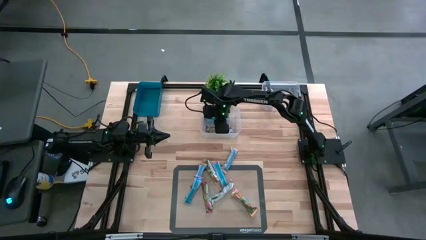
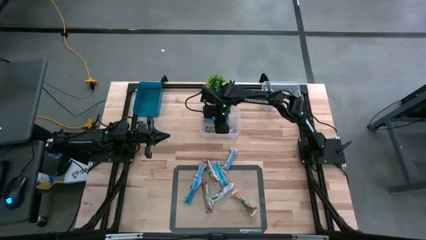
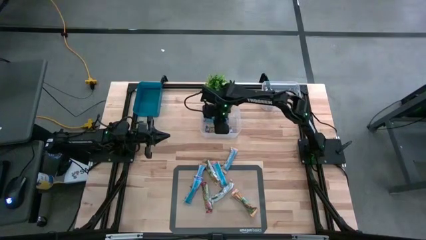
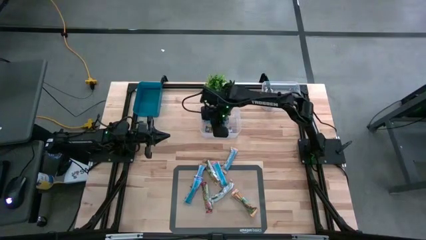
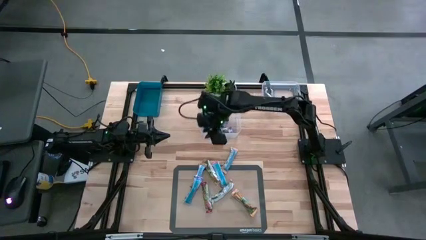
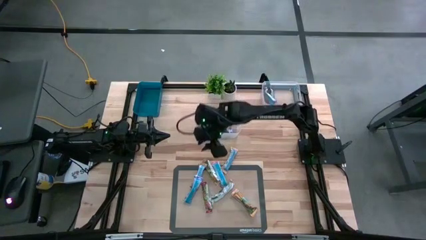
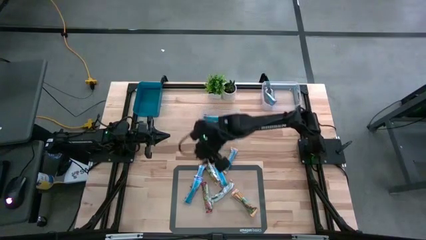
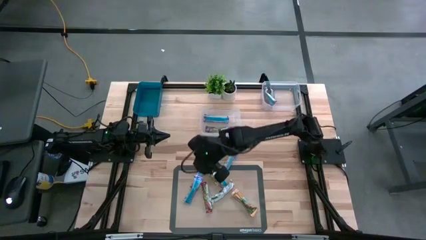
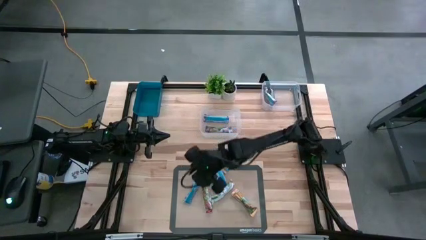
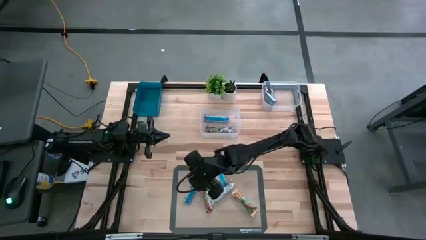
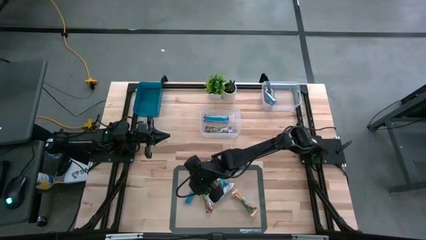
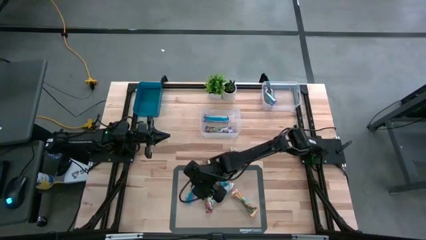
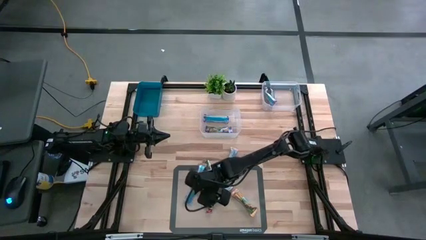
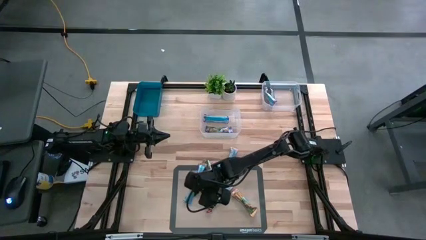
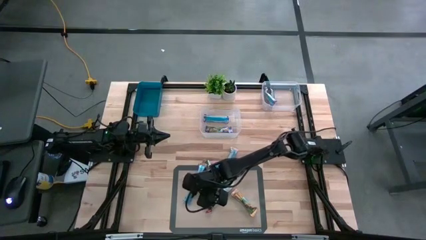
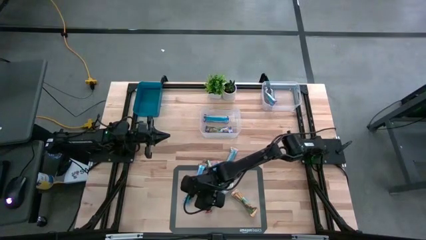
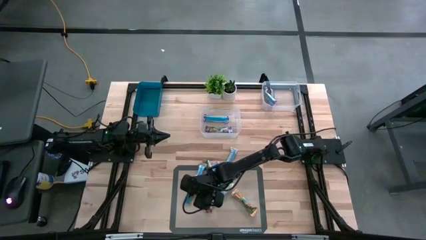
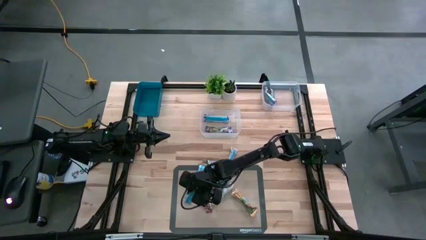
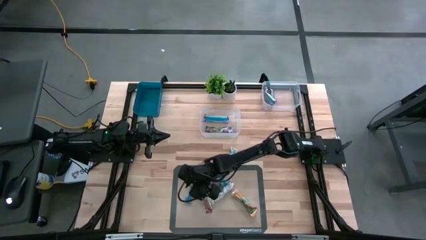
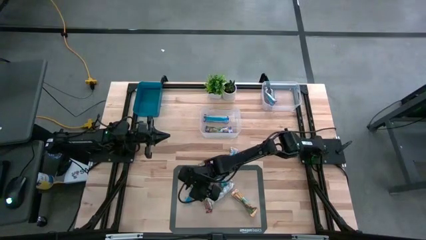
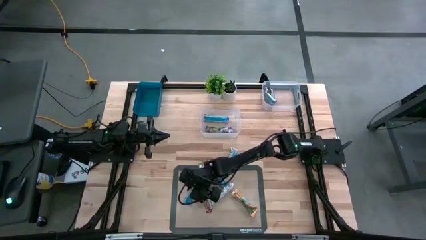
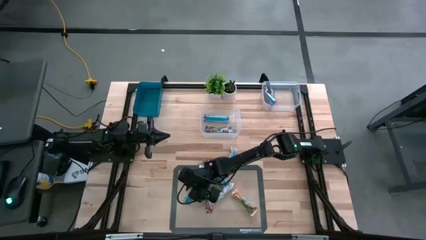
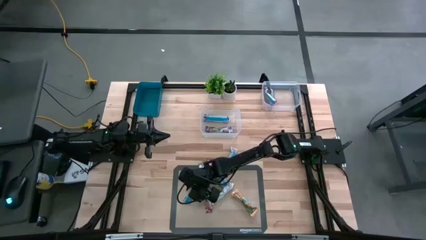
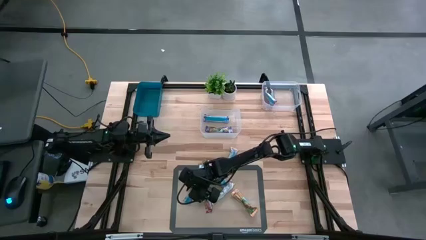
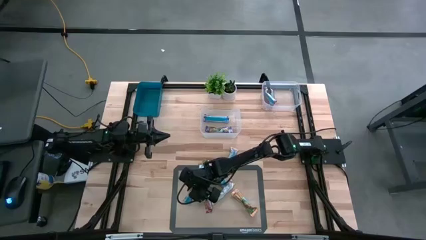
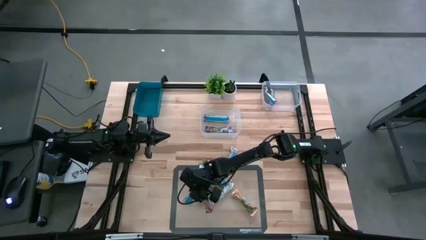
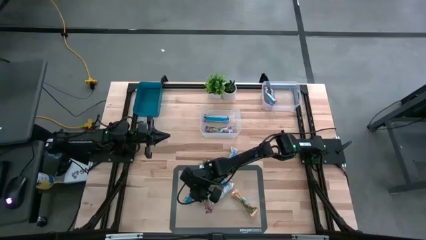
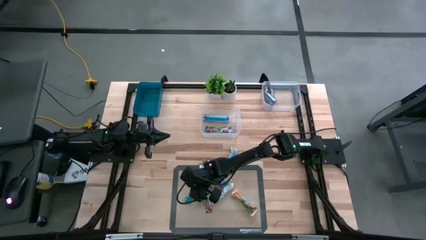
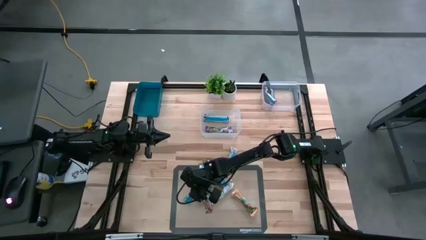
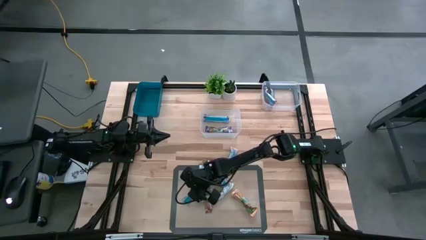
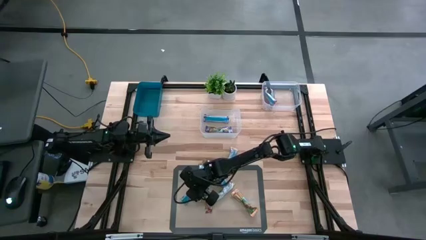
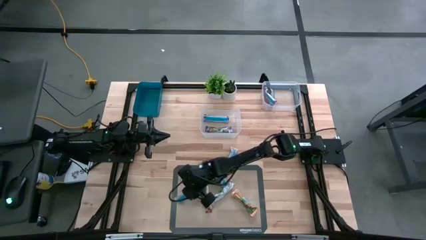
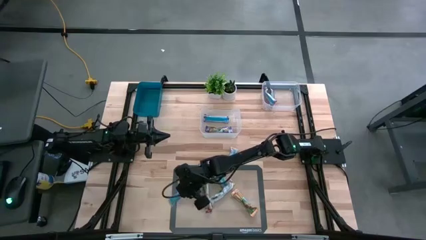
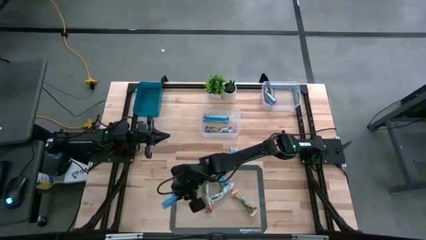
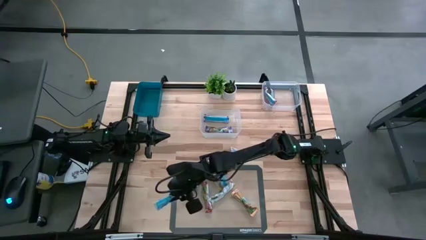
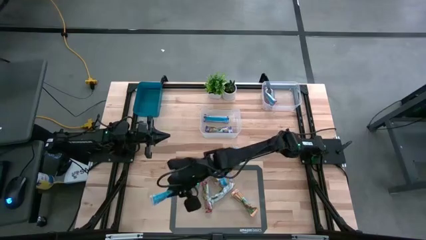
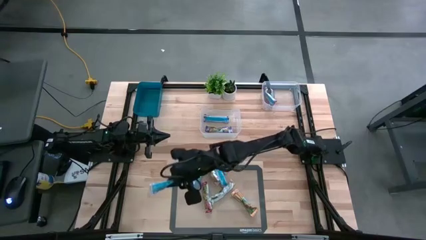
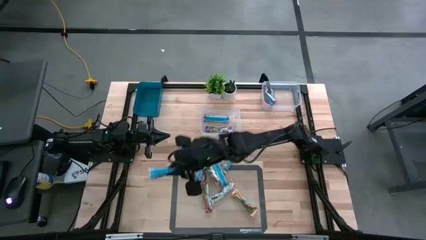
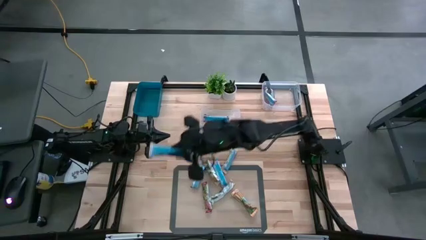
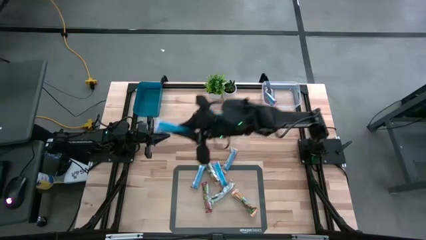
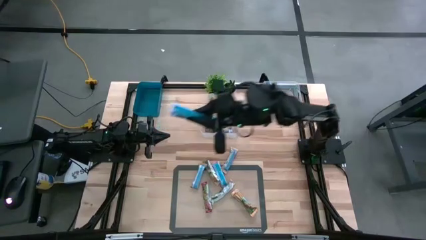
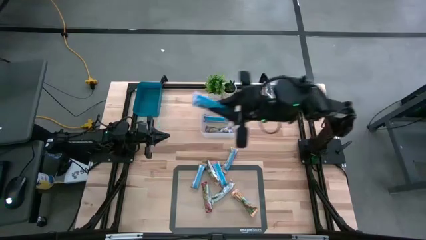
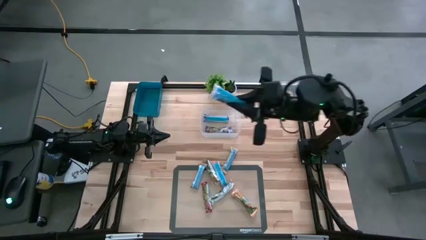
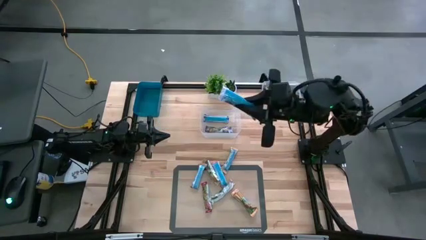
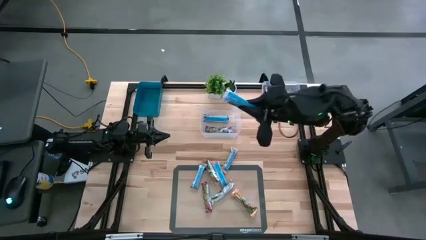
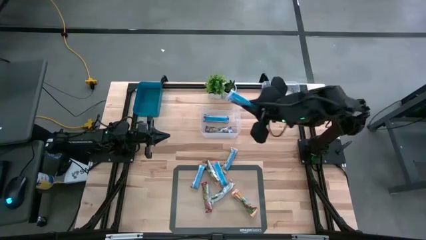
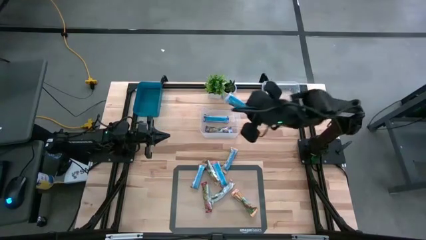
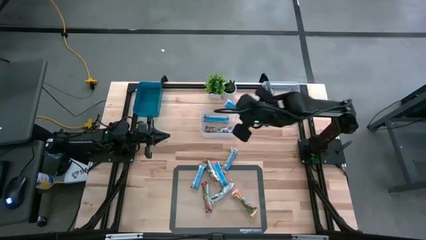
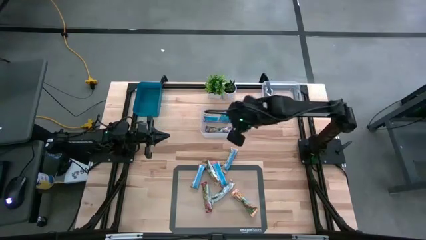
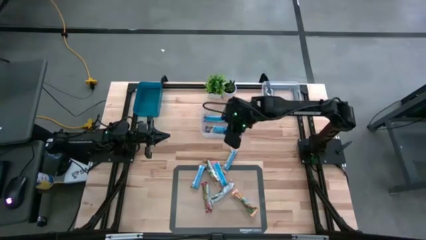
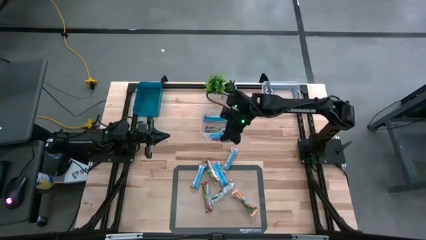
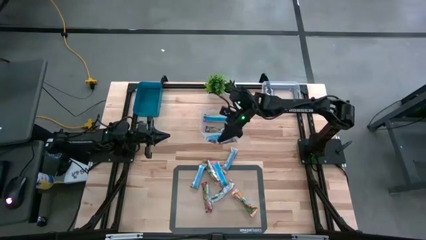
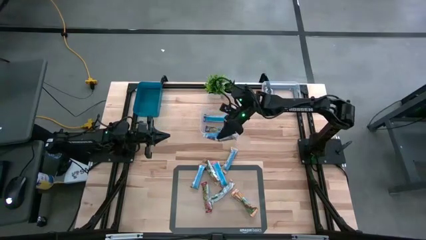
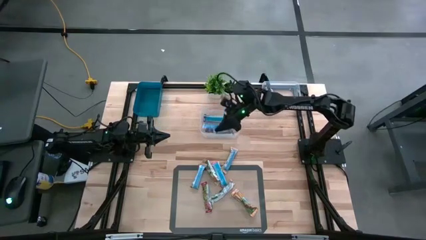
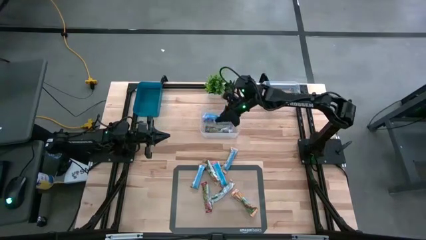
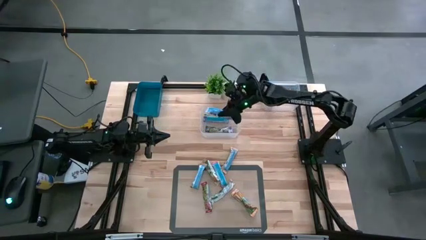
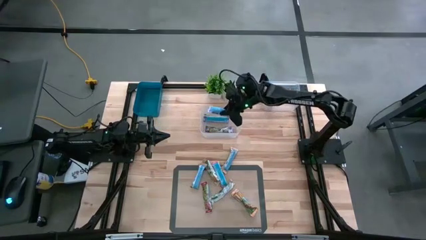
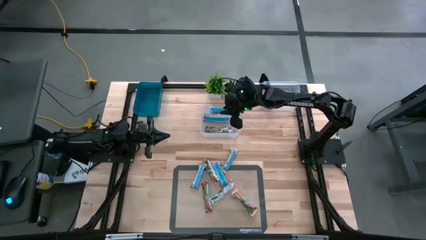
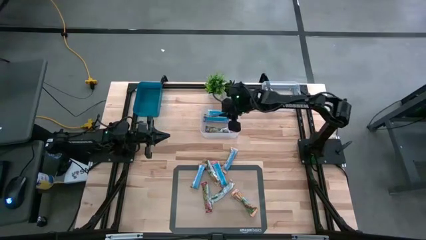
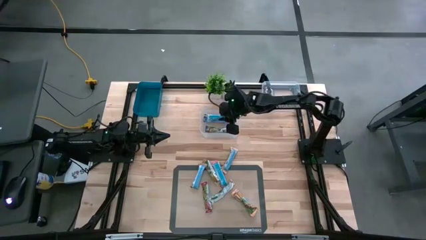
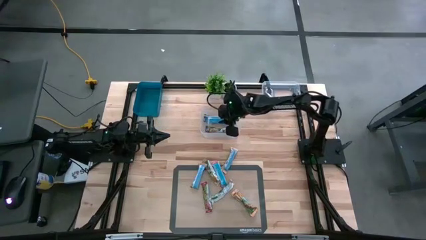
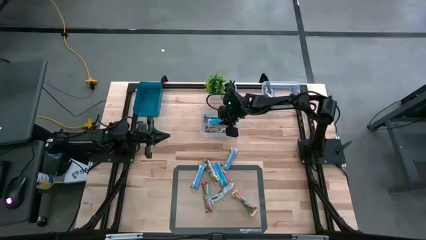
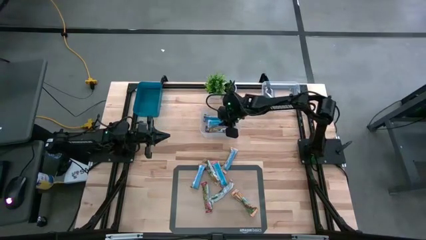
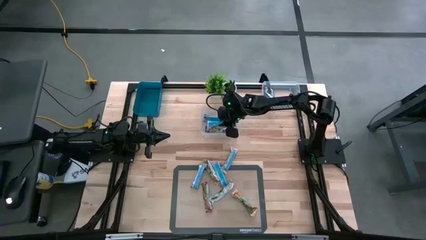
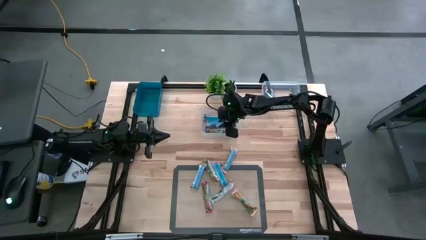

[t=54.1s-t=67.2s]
Task: Pick and place Granola Bars by type
Put the blue granola bar in the left transparent bin
